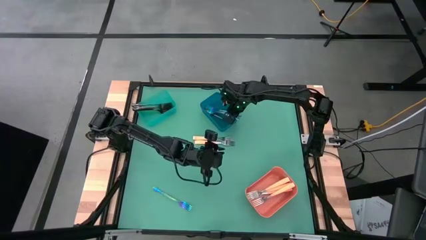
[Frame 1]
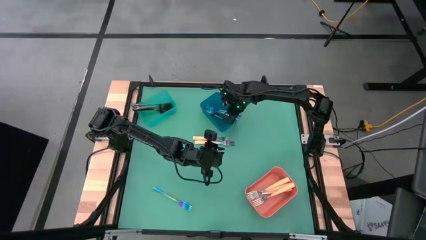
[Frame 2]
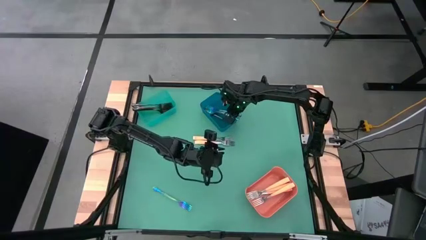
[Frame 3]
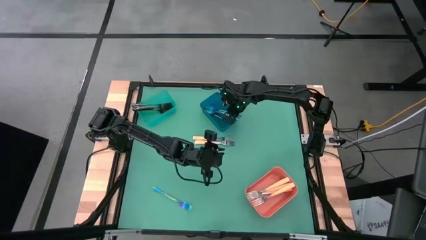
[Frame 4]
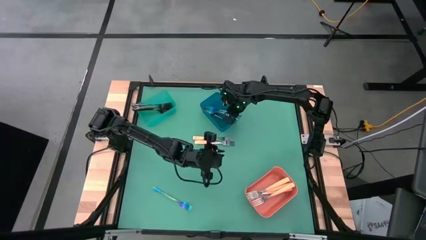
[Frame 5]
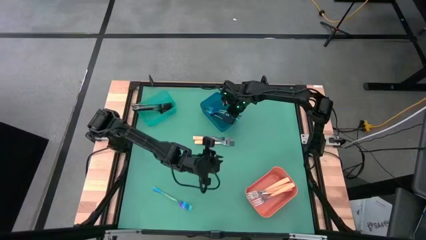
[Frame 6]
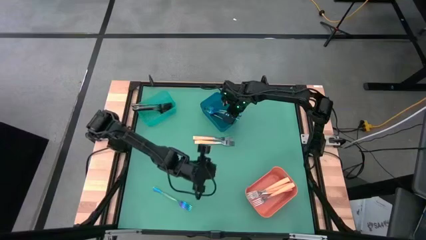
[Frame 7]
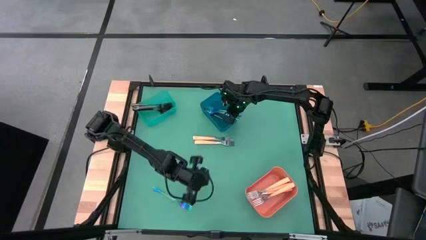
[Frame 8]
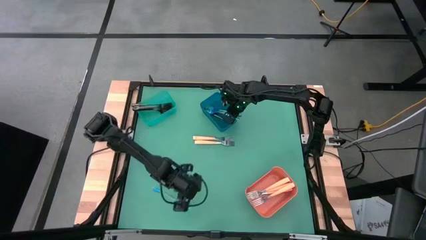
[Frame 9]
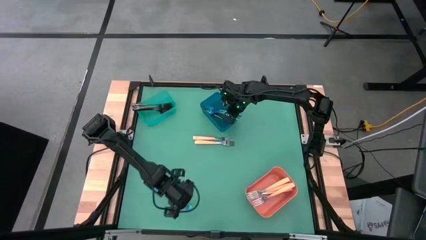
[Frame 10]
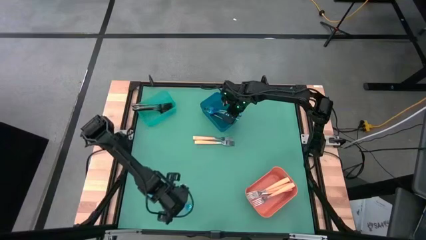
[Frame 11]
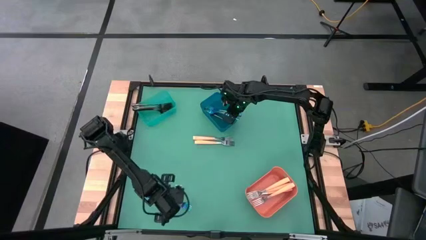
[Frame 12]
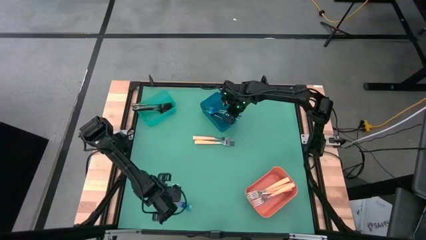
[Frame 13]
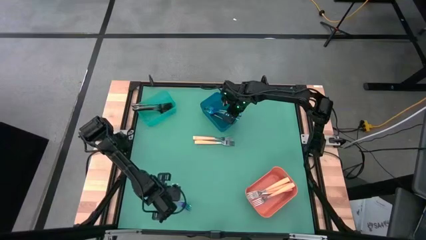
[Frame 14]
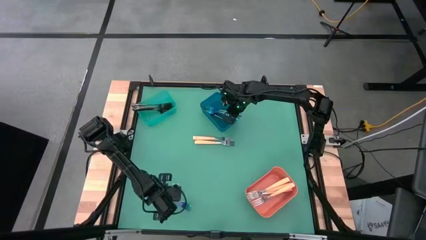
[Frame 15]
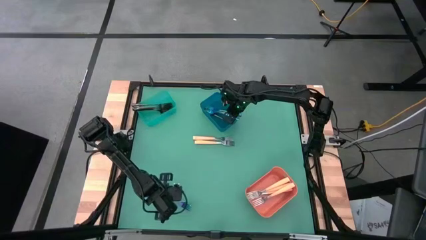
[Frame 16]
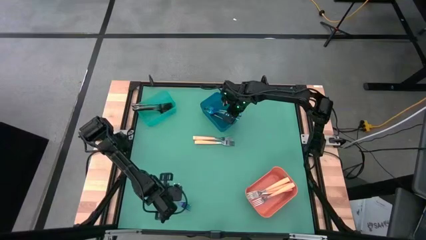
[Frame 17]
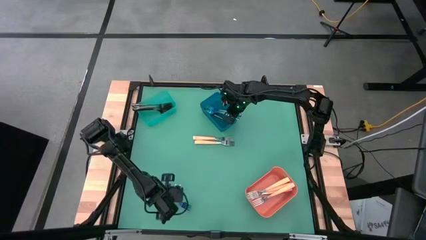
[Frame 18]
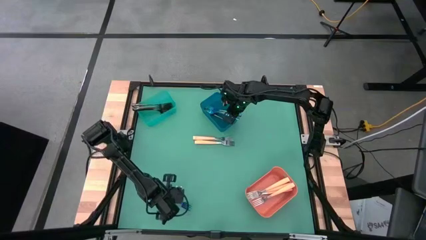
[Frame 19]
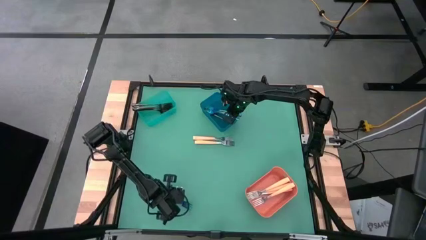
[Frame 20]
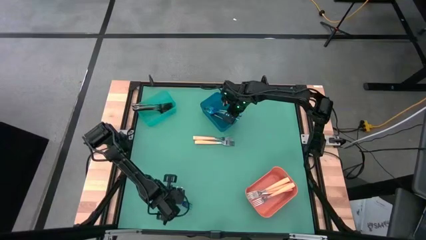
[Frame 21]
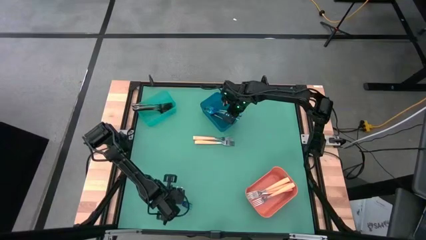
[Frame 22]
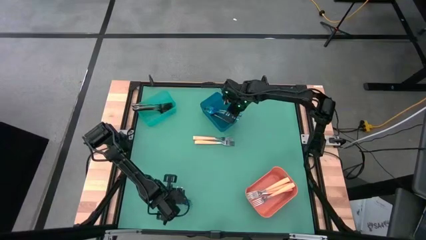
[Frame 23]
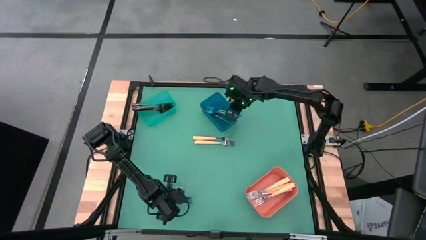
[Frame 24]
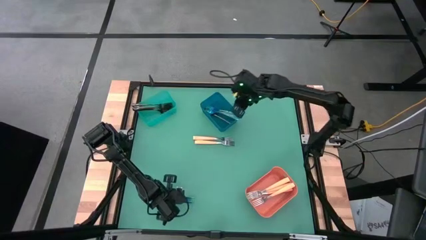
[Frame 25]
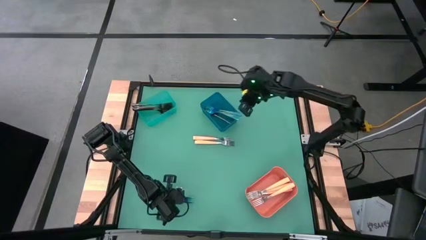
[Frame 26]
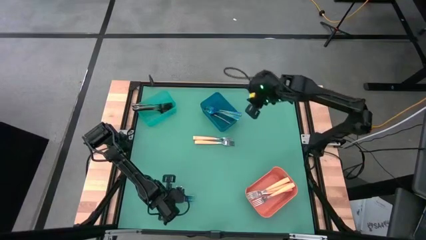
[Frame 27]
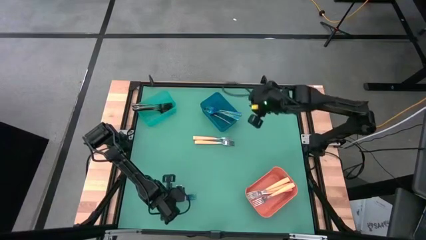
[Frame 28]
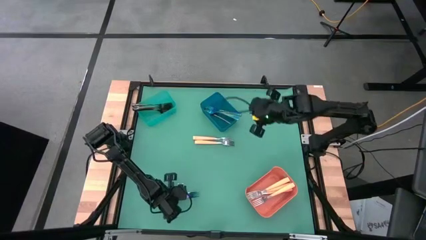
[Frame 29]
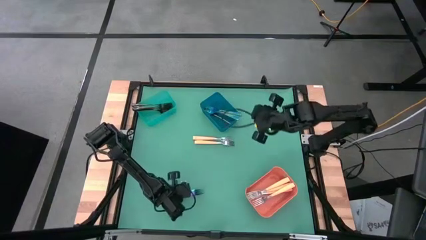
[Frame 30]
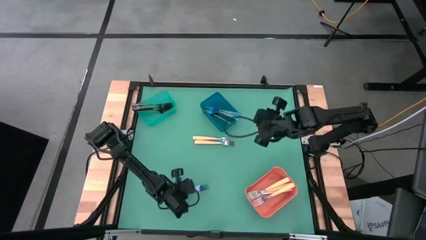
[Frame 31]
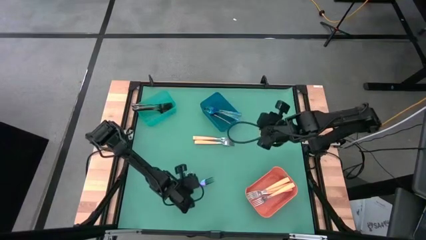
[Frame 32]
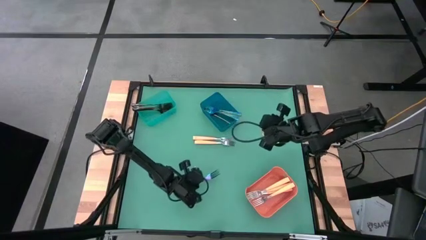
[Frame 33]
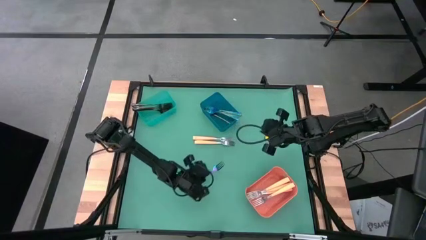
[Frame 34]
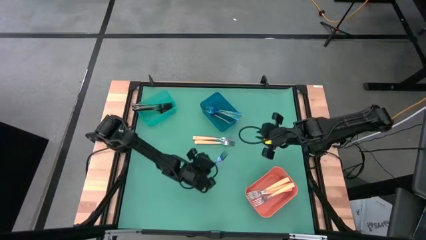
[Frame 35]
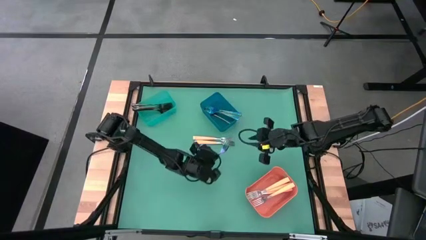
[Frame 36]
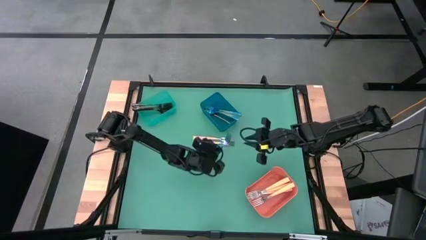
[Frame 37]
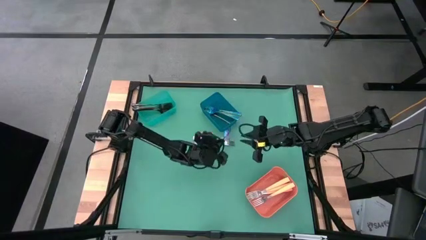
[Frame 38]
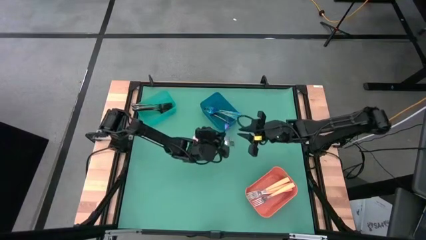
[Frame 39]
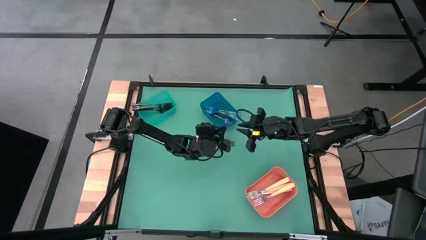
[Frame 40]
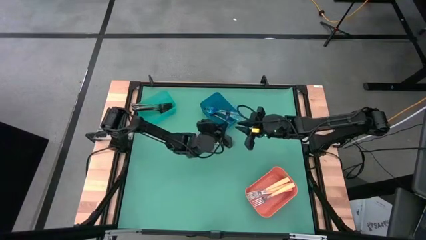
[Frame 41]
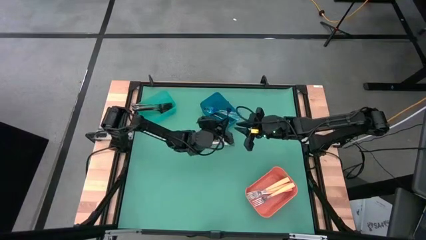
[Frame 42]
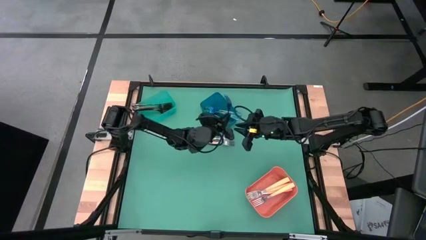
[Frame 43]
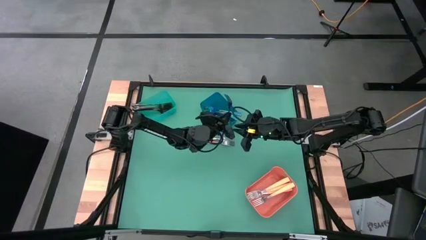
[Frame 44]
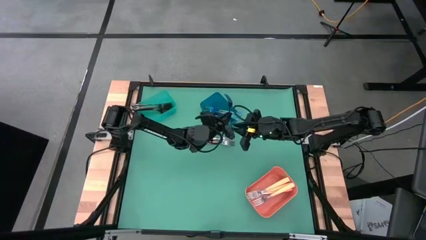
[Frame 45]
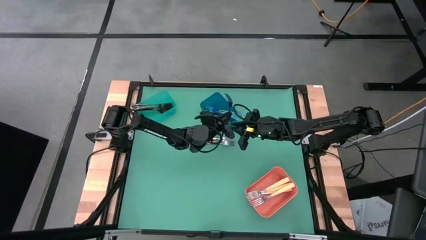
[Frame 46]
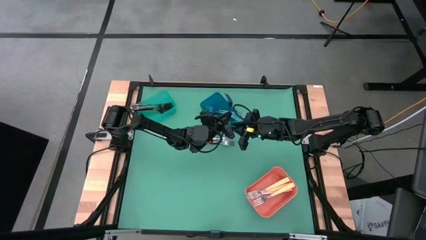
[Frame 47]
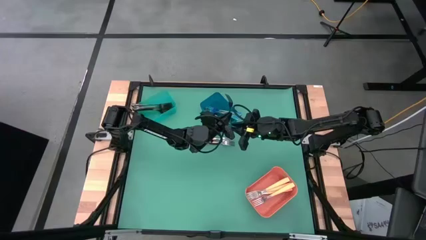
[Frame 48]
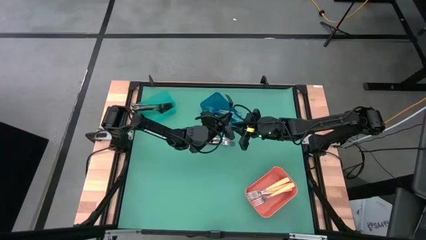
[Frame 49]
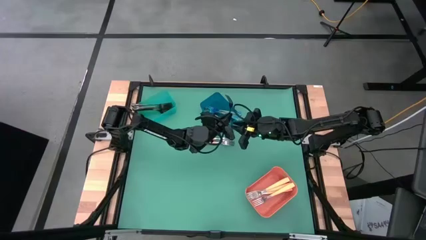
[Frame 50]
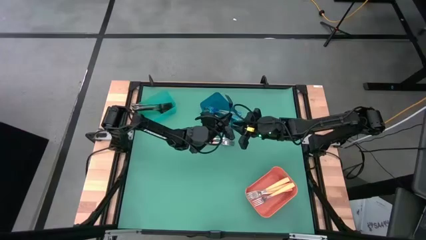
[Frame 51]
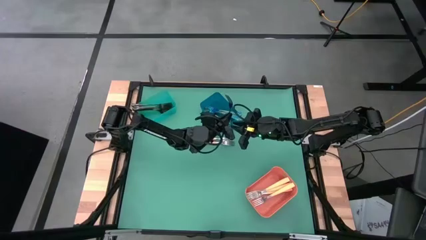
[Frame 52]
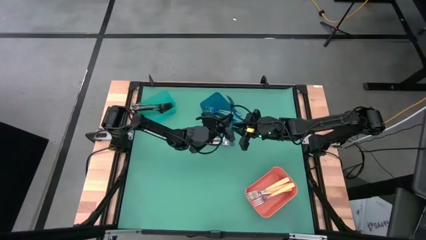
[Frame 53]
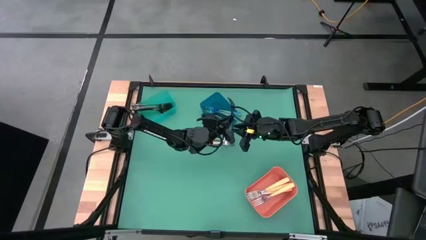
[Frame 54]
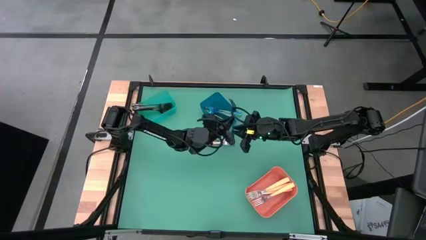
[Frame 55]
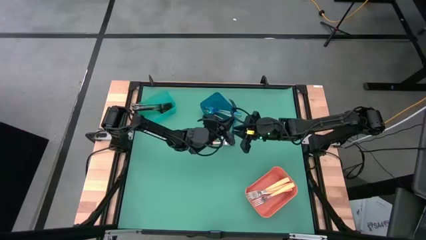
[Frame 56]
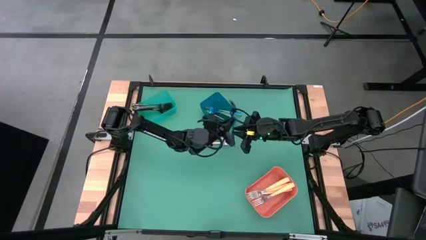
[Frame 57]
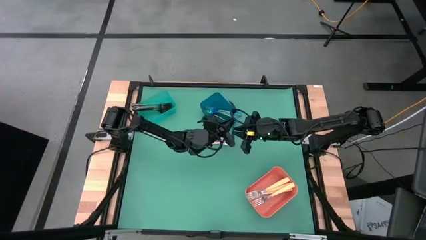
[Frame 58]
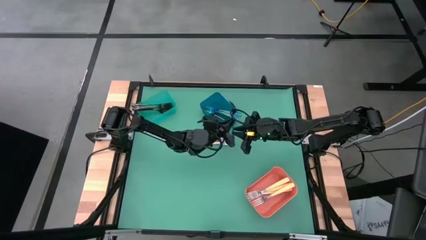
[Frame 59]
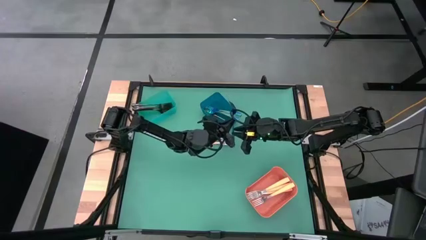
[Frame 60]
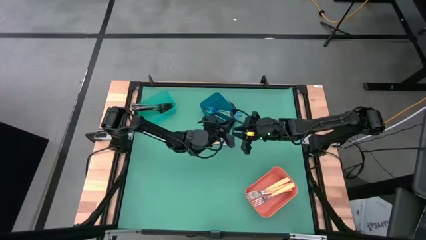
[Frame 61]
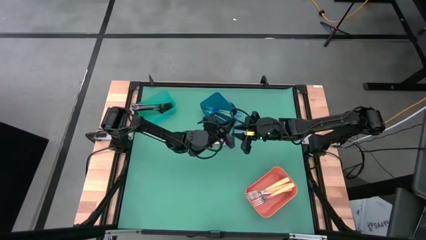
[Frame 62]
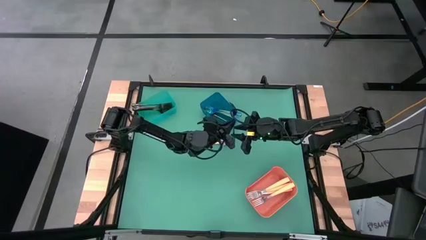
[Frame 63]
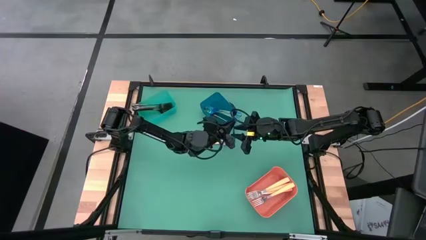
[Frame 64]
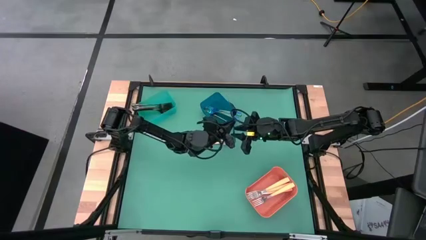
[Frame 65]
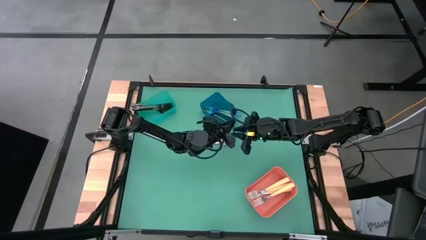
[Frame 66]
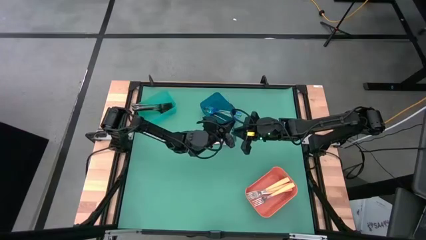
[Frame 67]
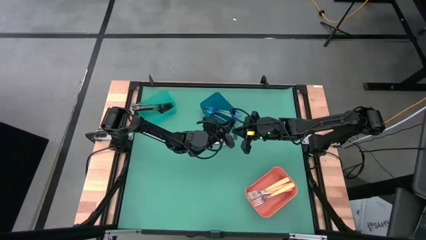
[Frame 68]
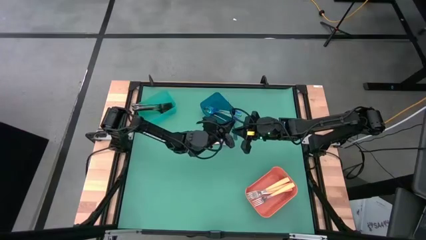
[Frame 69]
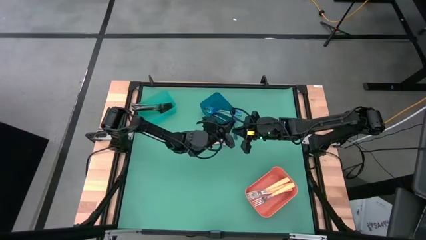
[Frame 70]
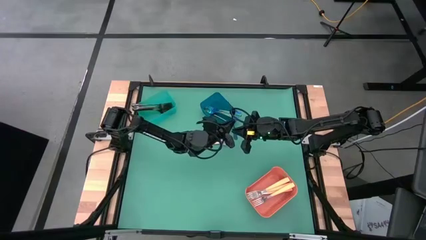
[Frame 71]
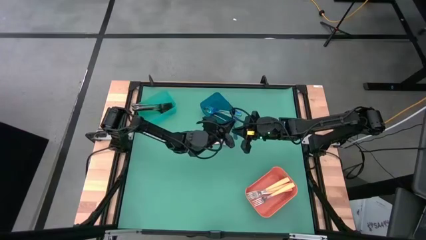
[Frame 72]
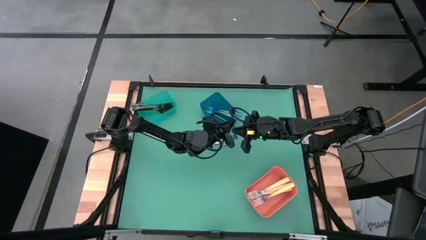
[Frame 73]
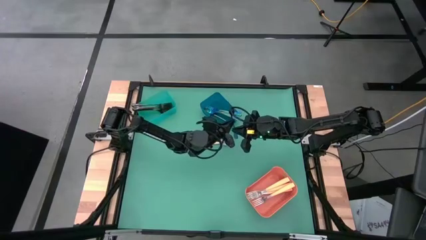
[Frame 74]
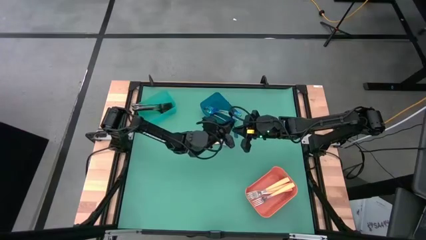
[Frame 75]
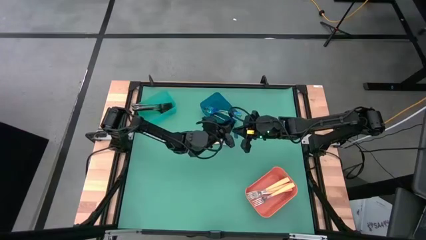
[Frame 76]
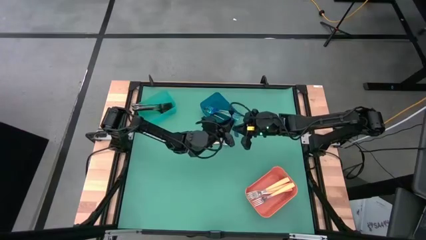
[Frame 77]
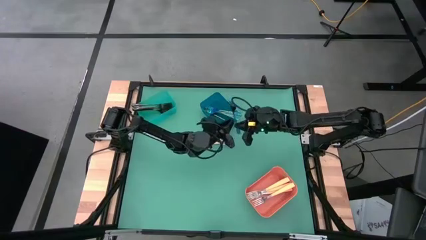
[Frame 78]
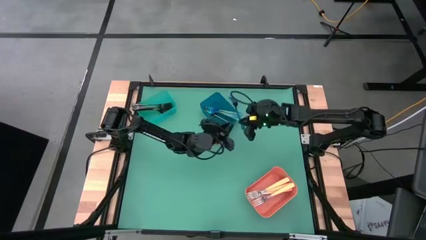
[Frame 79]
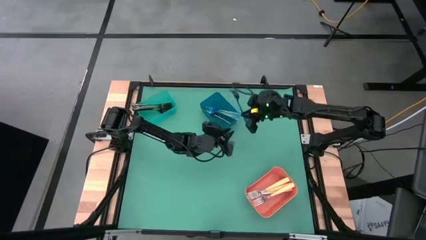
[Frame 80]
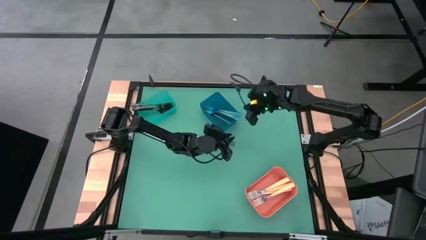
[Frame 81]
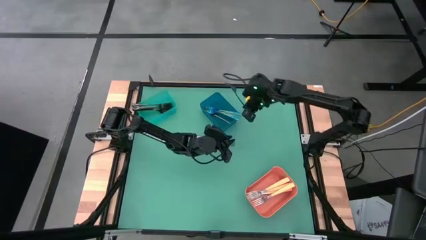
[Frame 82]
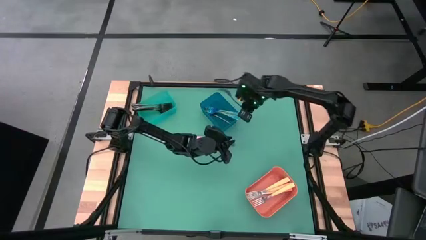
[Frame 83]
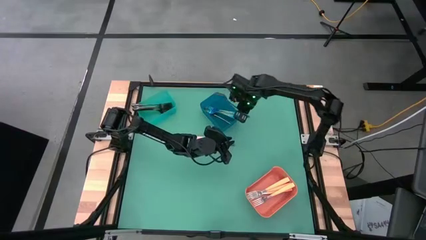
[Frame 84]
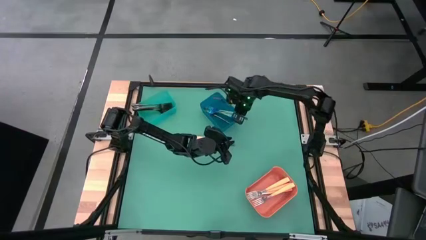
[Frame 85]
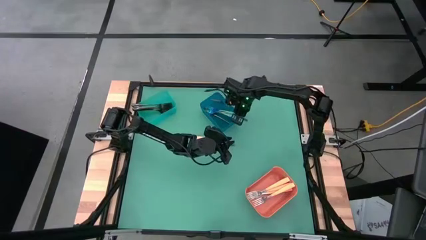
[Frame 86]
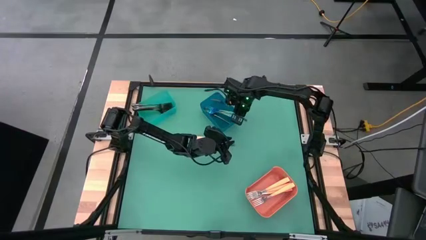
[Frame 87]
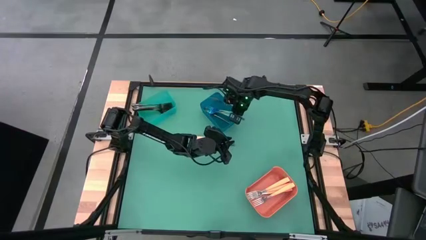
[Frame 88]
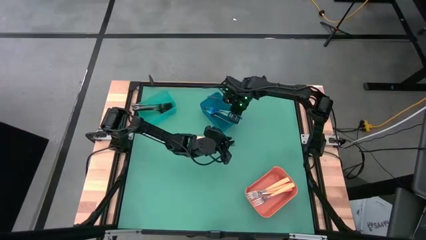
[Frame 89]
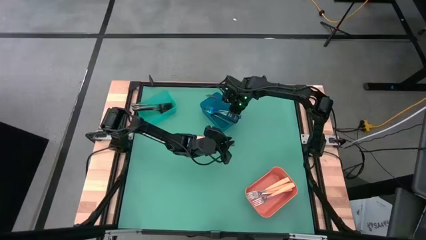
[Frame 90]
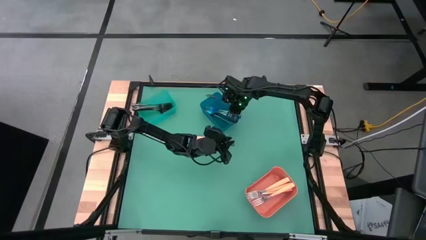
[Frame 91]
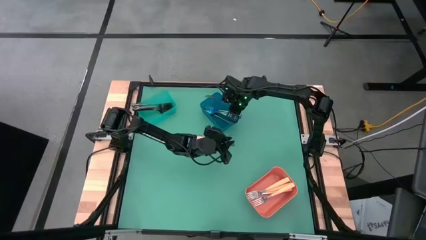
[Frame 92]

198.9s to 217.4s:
Task: Sort silverware by color (type)
Put the purple fork into the blue bin
